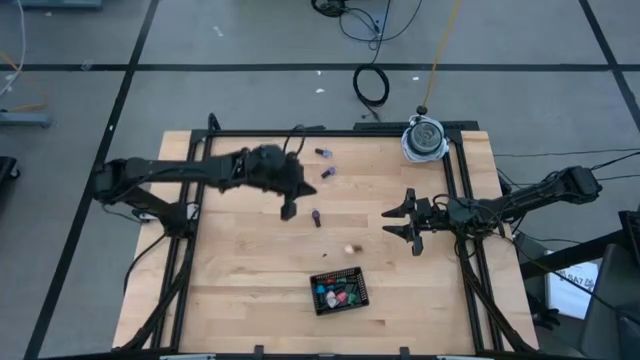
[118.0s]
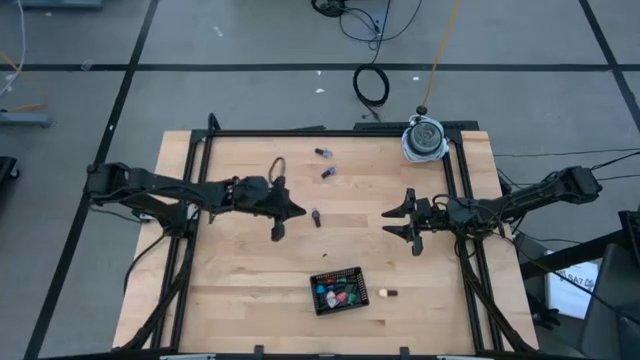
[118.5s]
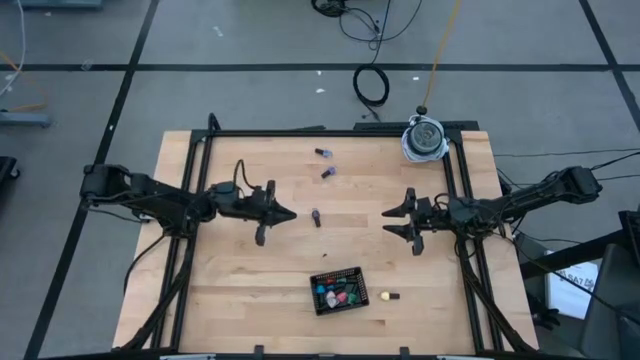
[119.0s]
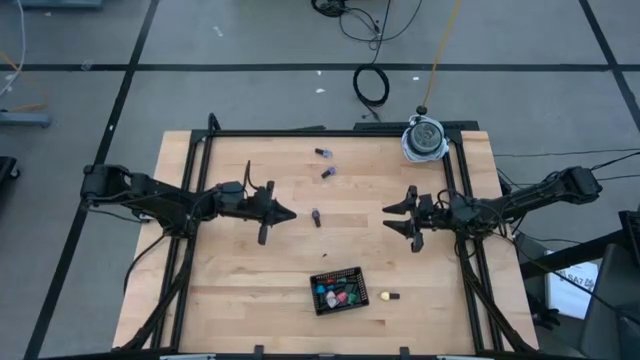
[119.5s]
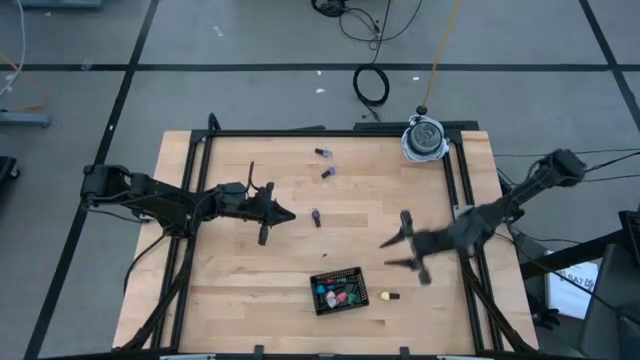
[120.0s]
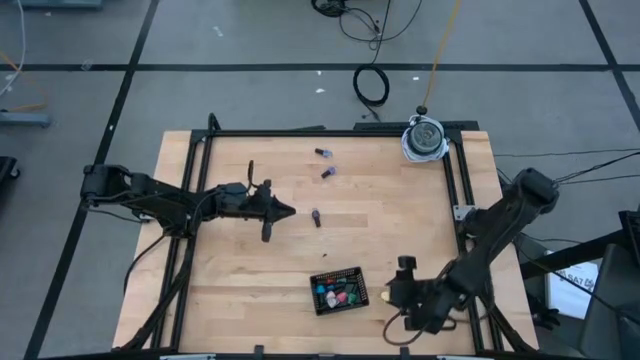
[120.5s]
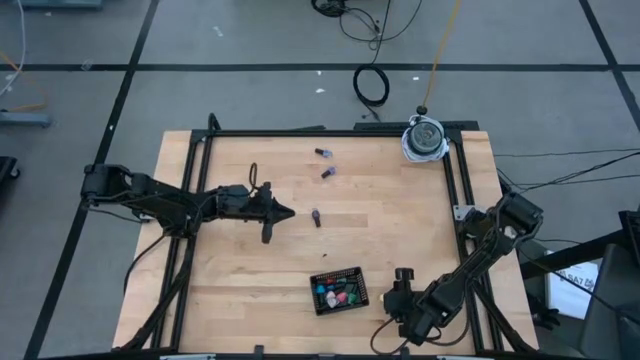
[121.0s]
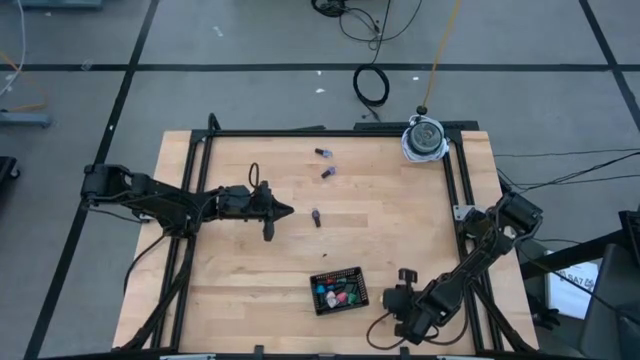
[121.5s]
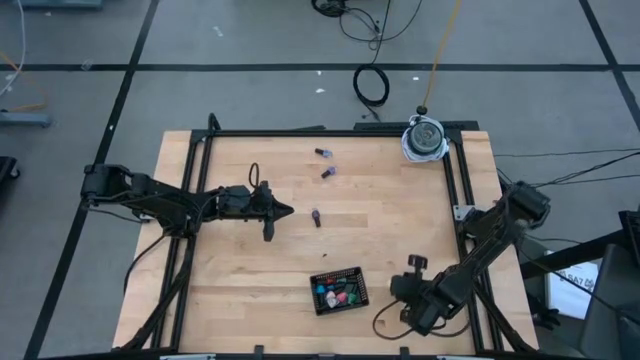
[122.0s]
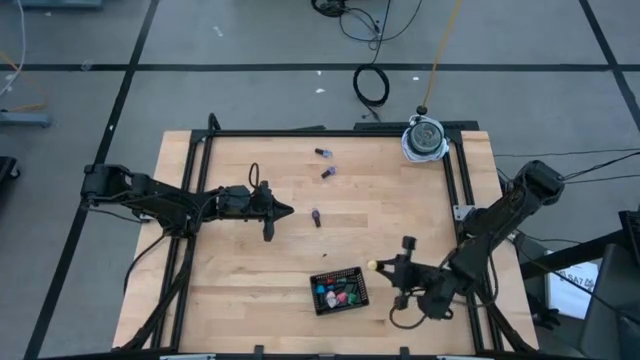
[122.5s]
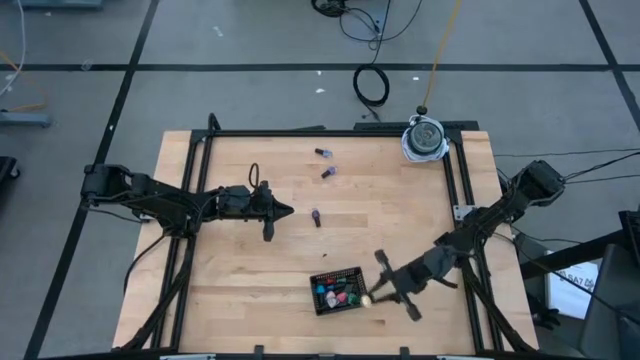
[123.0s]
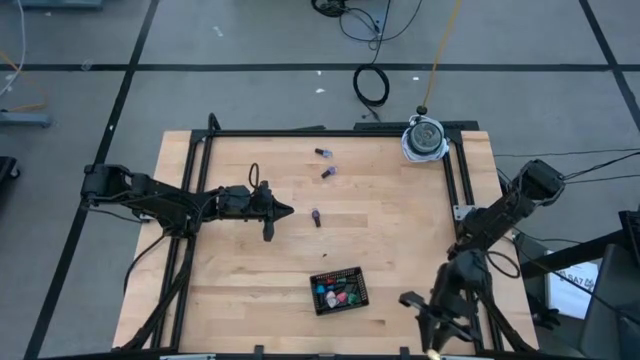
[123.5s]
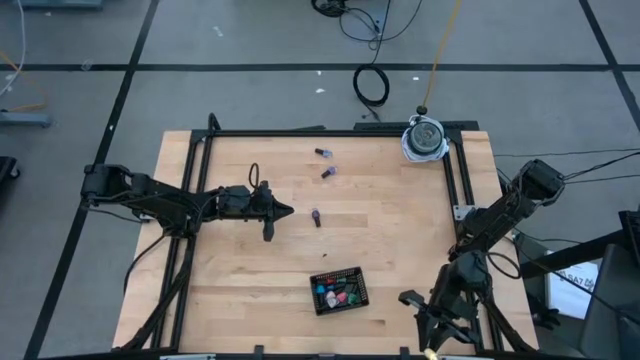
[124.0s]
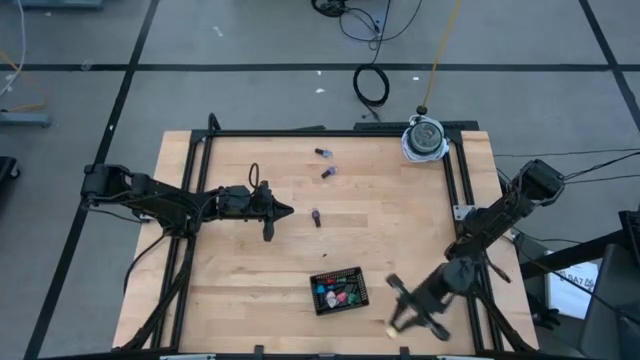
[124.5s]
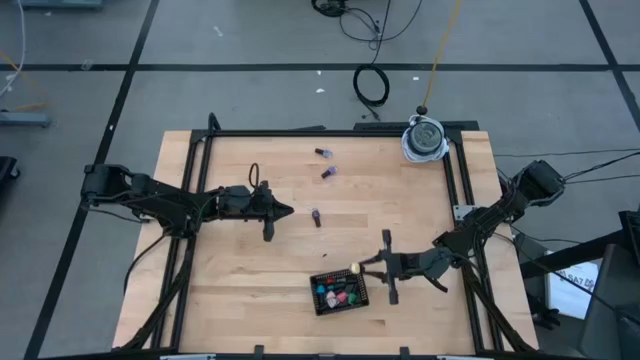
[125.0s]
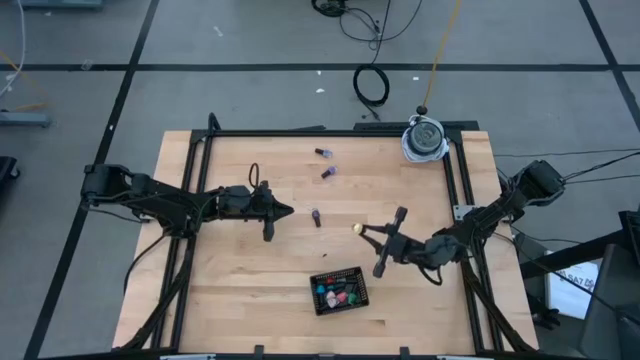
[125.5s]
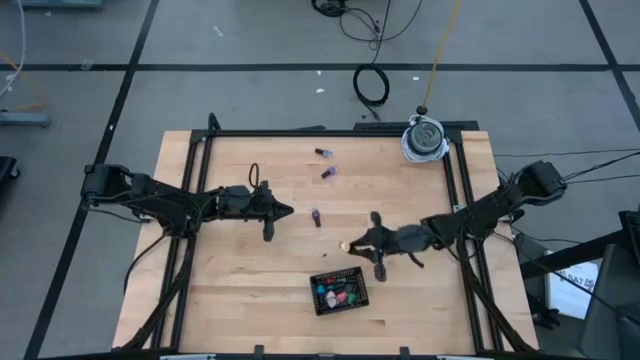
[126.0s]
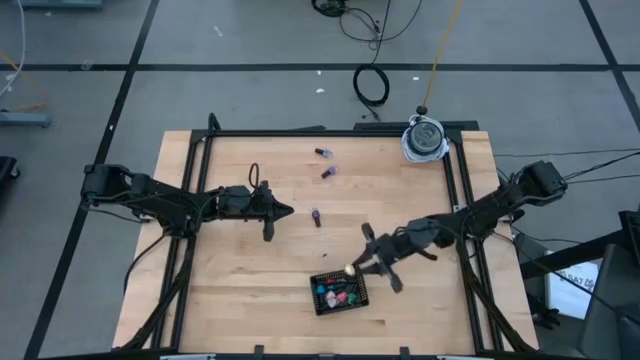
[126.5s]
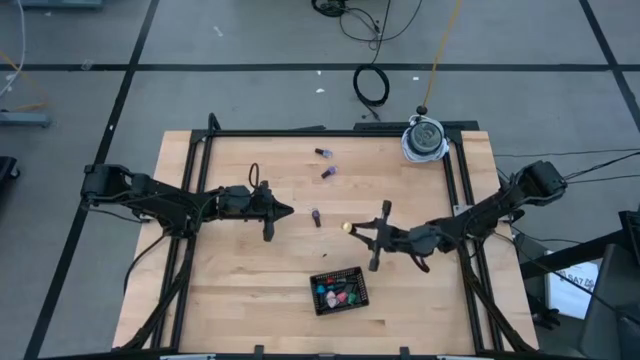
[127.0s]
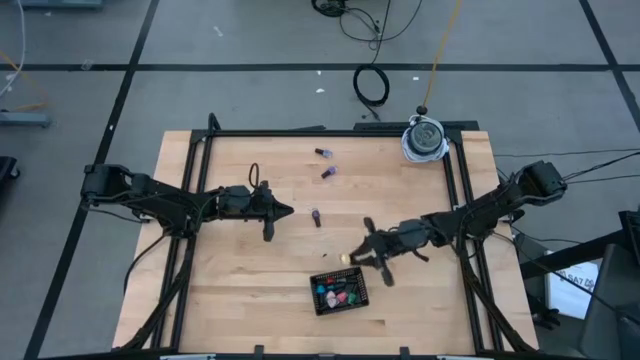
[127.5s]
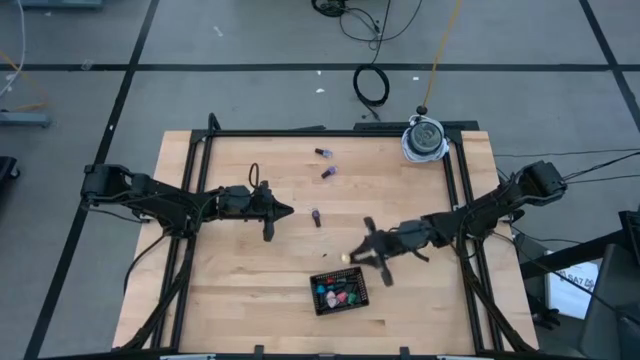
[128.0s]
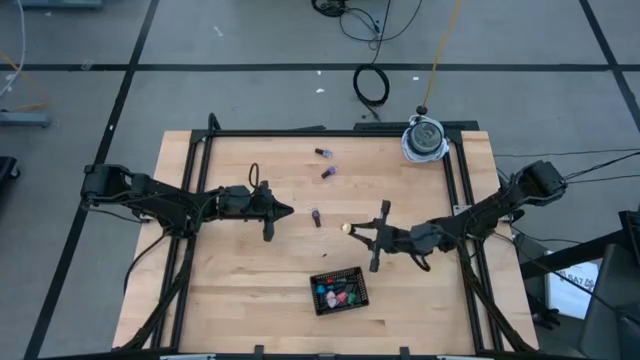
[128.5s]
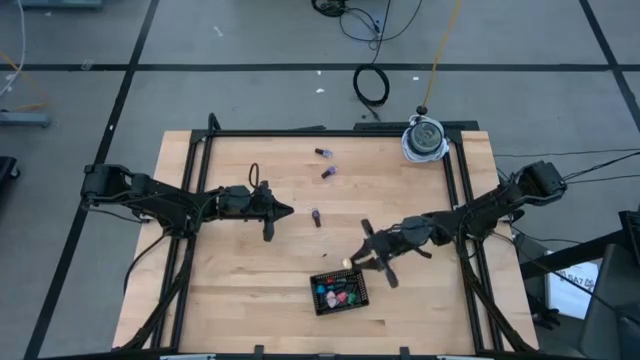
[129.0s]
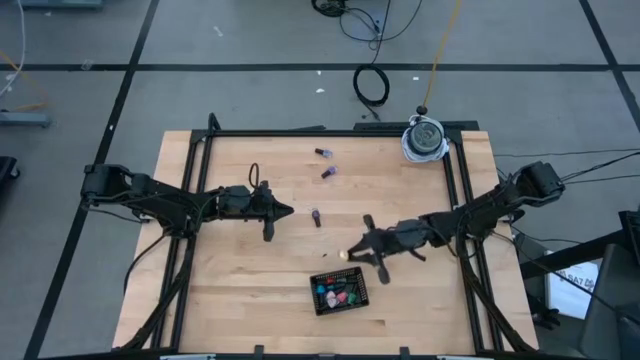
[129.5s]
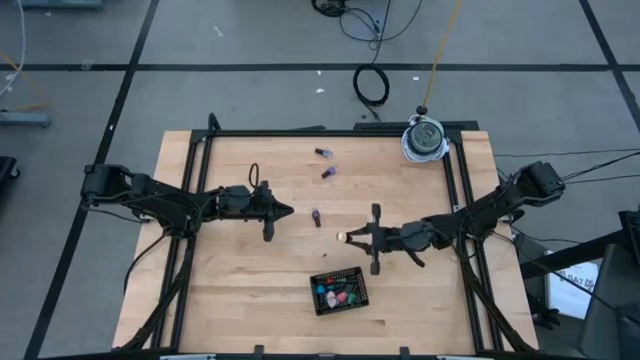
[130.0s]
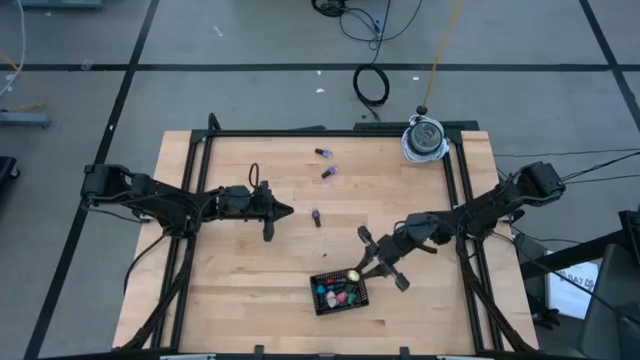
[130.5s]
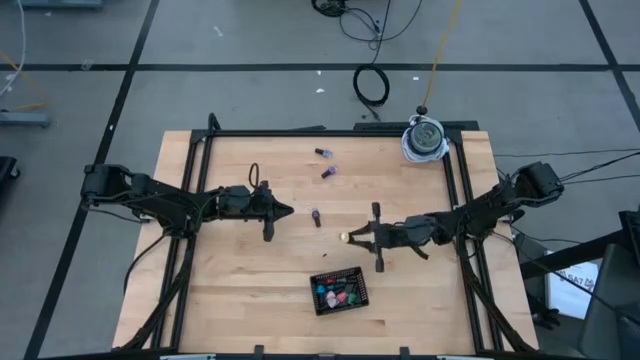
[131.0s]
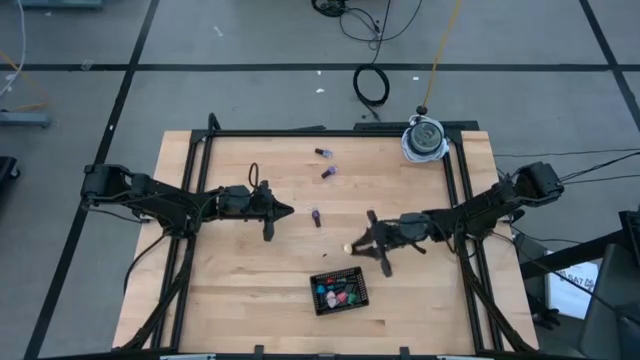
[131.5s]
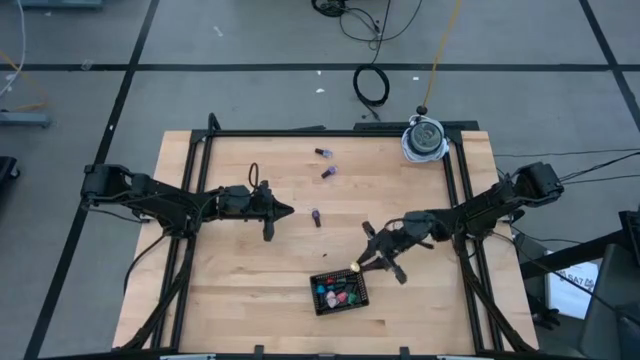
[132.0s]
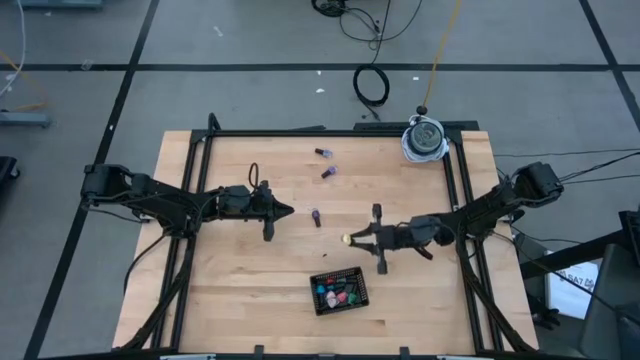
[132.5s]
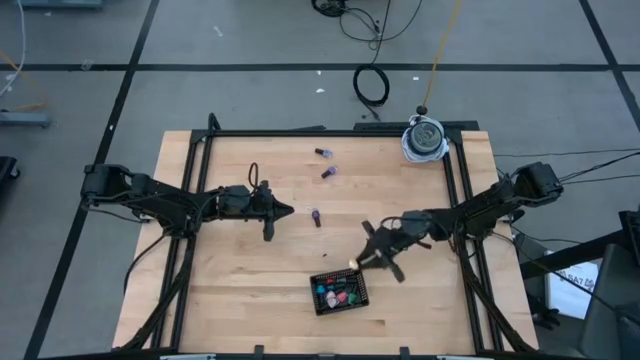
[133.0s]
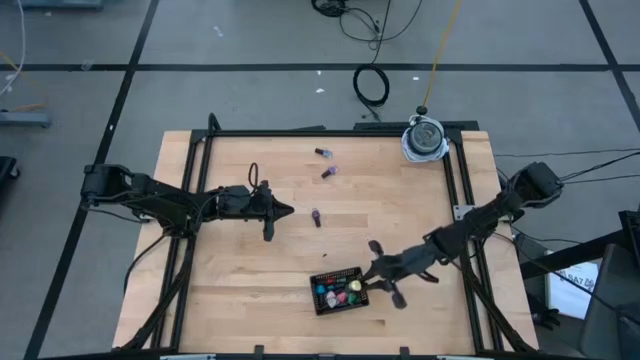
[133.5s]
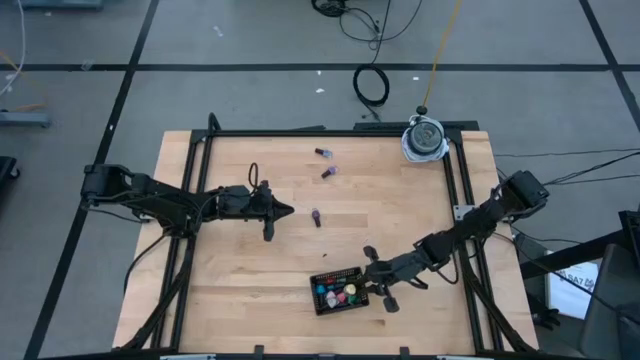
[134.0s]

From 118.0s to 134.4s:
Task: Pick & Place Nail Polish
Put the yellow nail polish bottle into the black bin

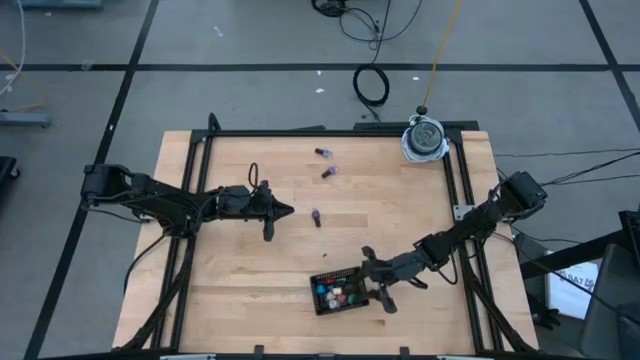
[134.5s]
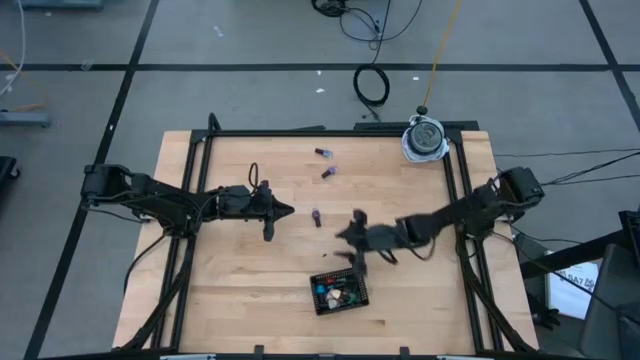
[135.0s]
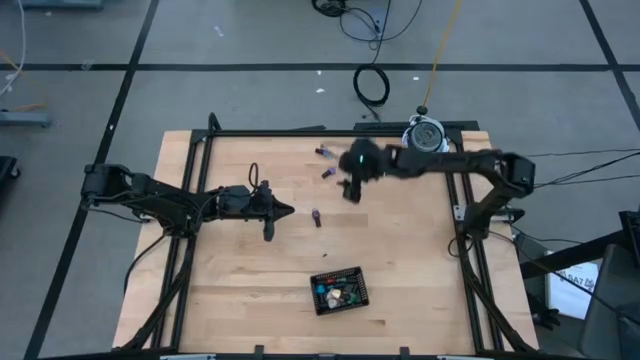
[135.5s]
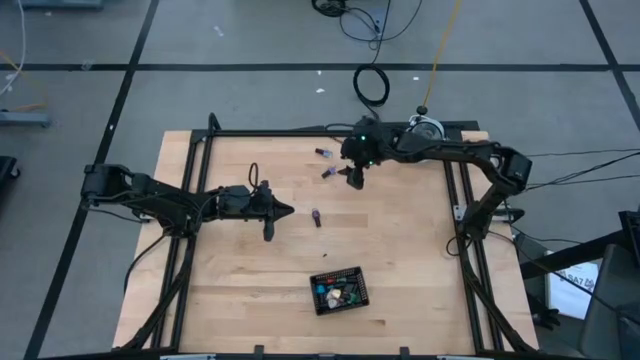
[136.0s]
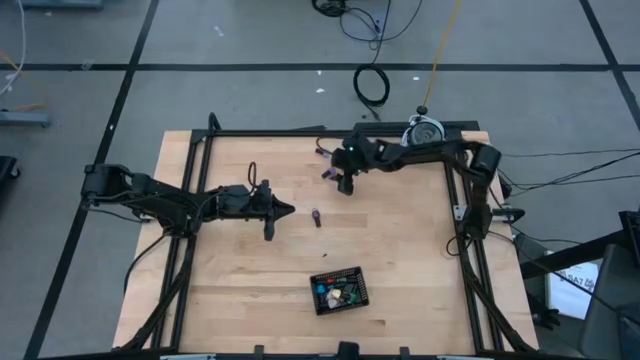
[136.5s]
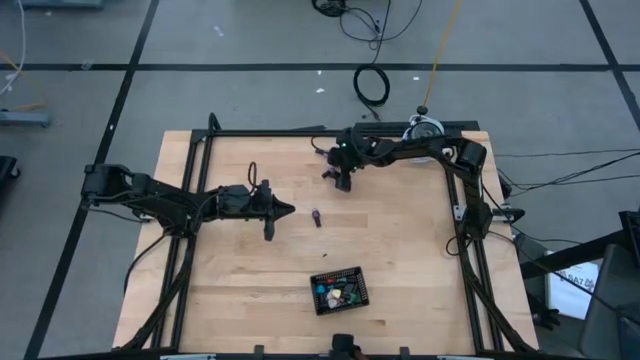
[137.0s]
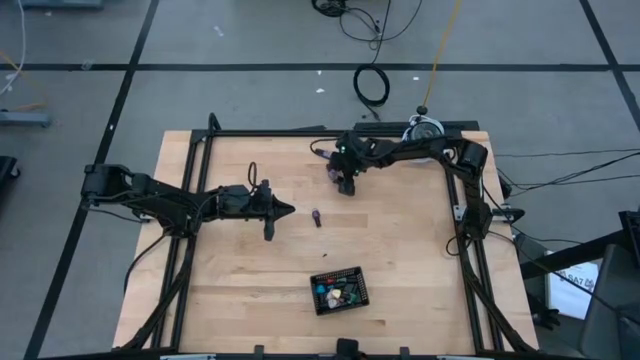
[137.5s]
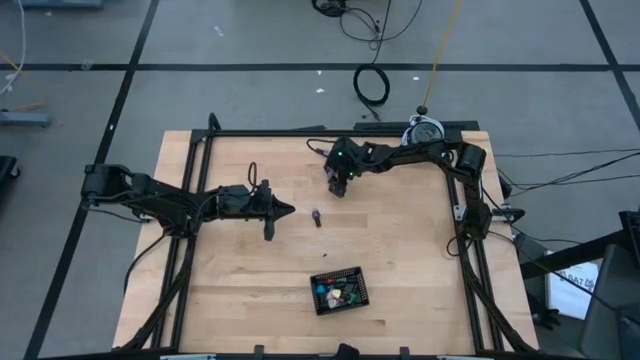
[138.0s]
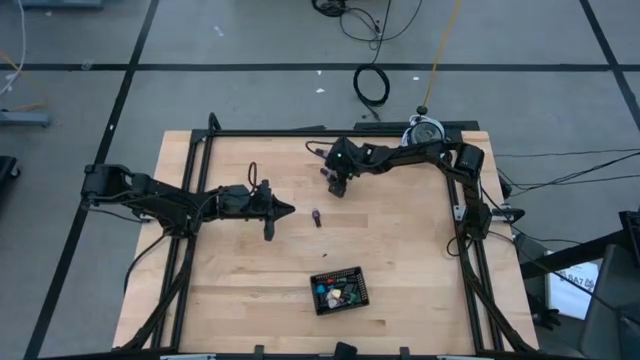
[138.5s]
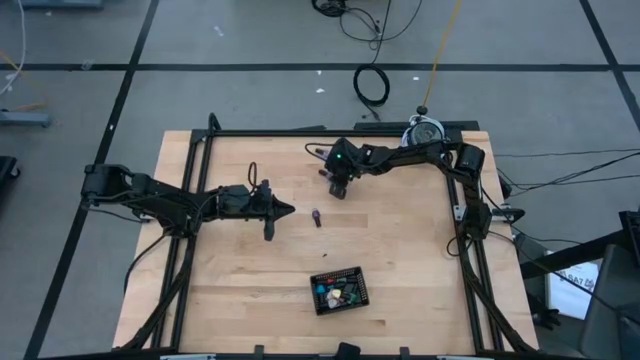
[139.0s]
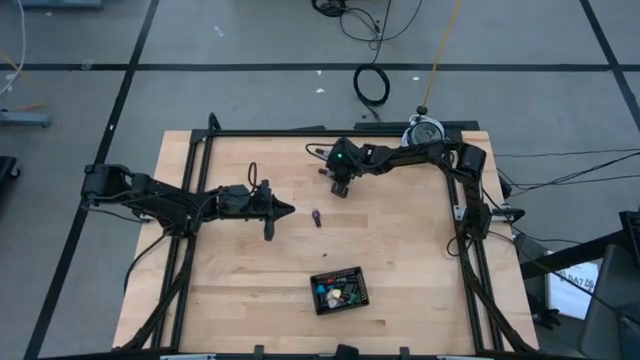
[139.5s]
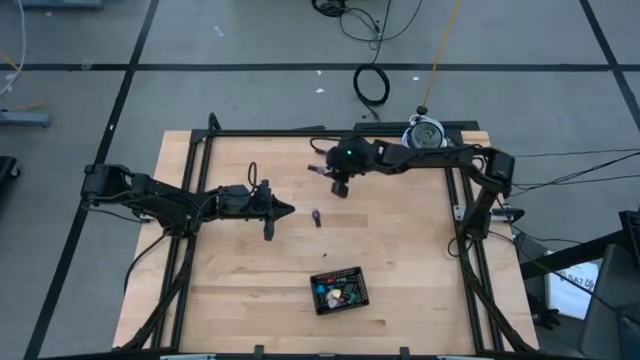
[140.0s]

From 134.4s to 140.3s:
Put the purple nail polish bottle into the black bin
